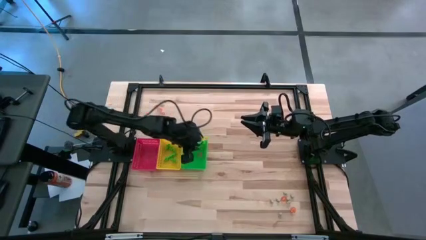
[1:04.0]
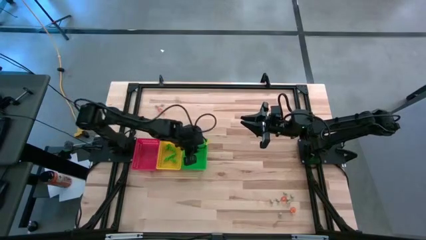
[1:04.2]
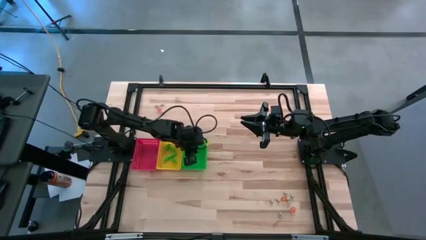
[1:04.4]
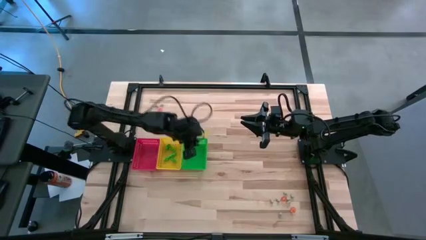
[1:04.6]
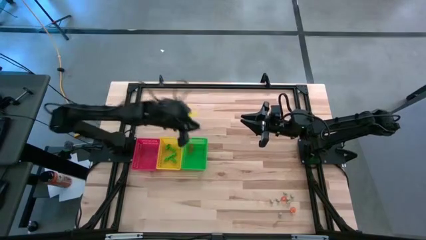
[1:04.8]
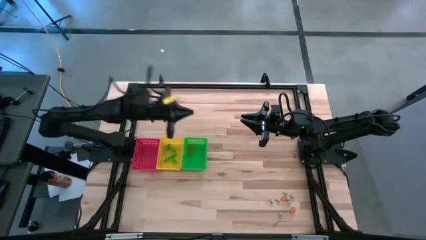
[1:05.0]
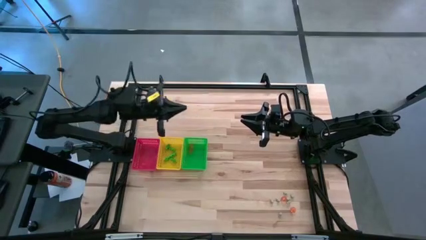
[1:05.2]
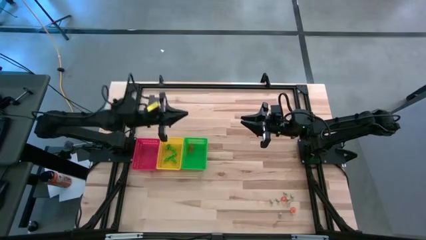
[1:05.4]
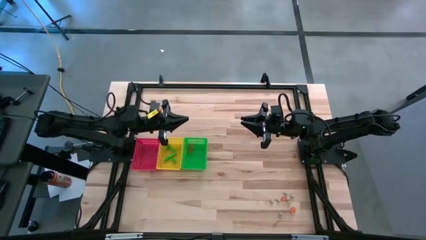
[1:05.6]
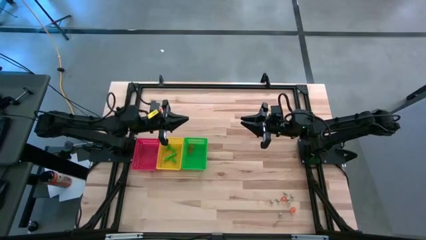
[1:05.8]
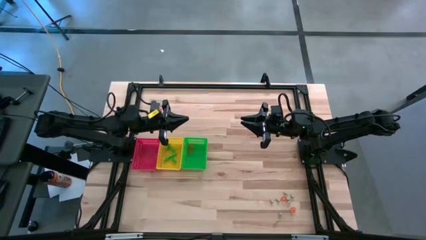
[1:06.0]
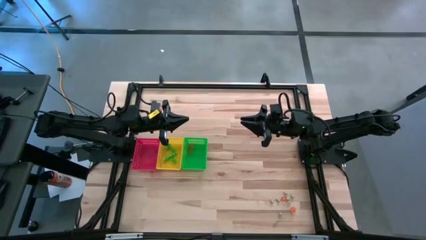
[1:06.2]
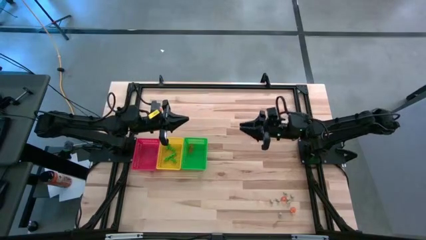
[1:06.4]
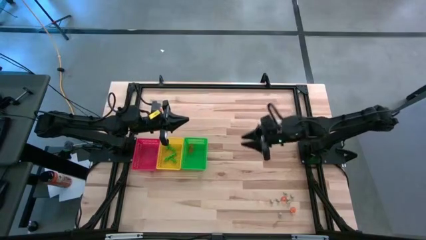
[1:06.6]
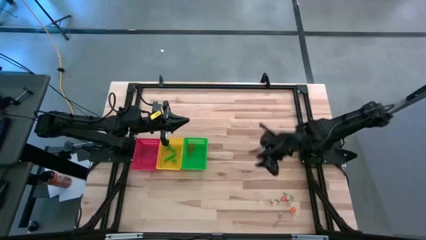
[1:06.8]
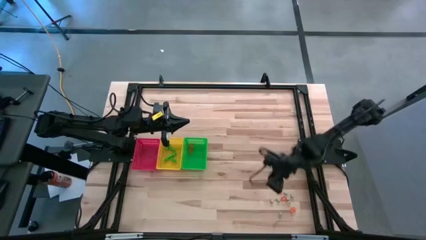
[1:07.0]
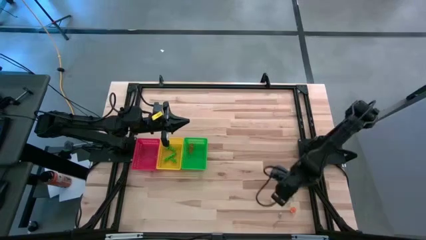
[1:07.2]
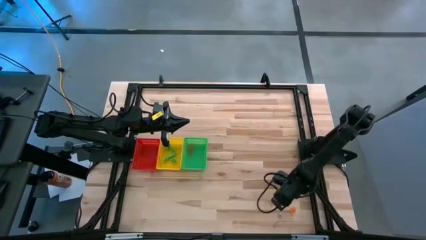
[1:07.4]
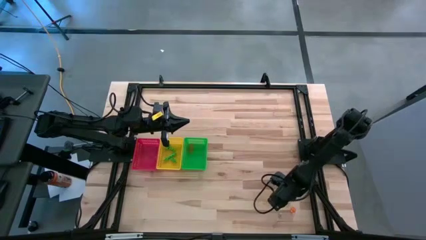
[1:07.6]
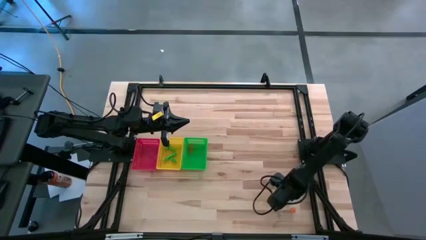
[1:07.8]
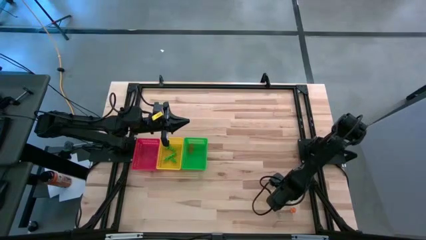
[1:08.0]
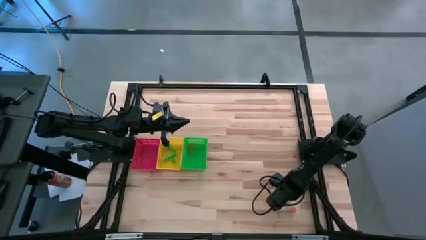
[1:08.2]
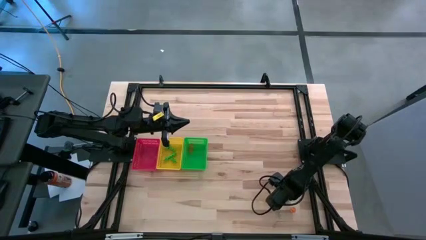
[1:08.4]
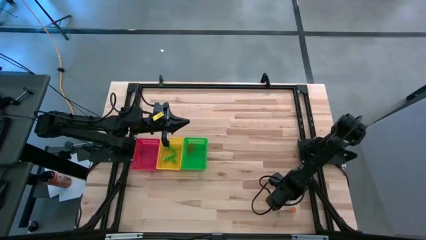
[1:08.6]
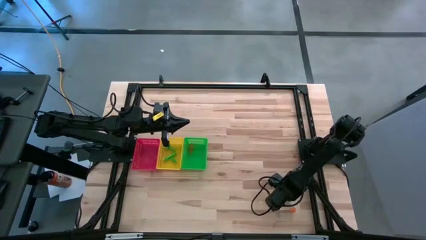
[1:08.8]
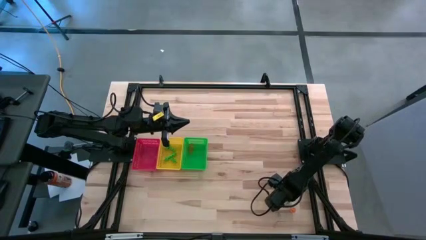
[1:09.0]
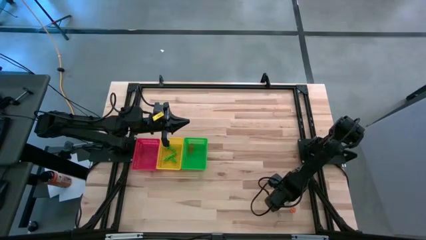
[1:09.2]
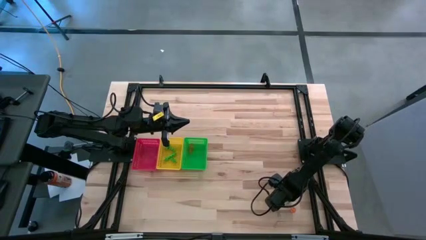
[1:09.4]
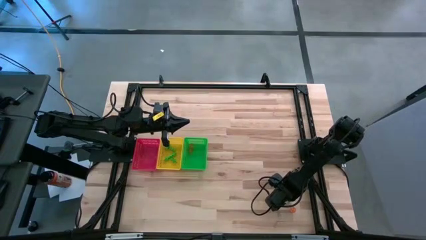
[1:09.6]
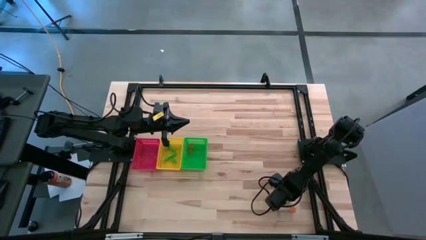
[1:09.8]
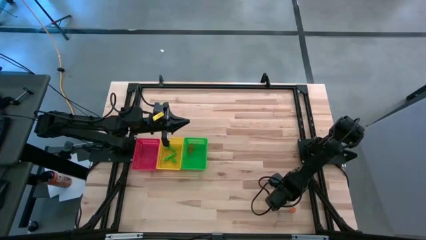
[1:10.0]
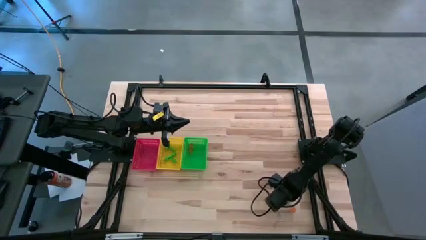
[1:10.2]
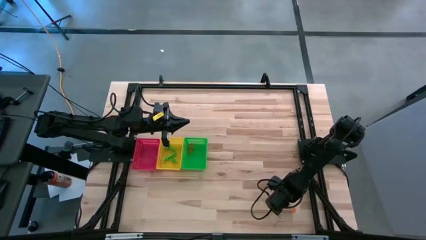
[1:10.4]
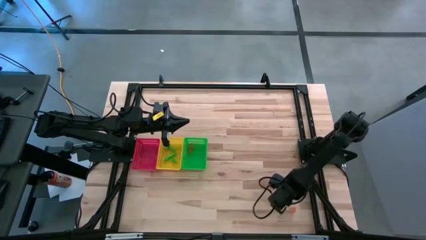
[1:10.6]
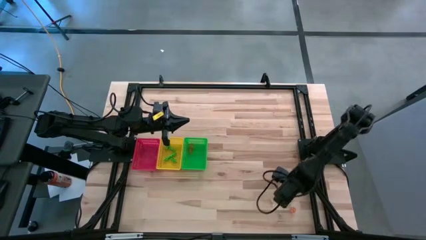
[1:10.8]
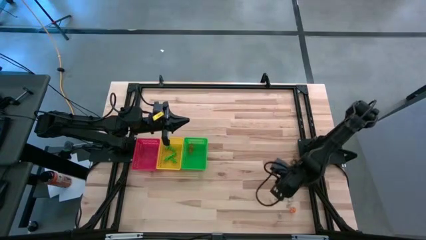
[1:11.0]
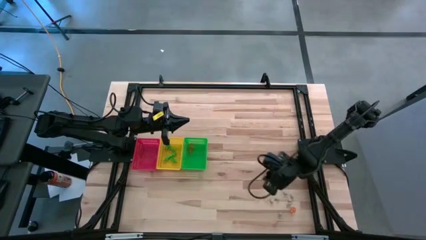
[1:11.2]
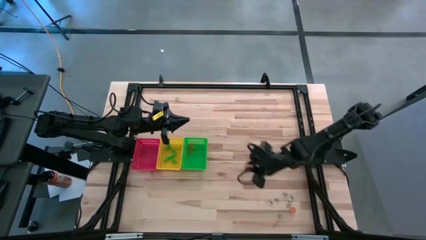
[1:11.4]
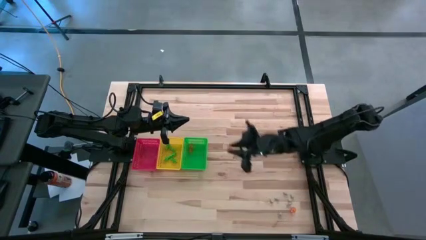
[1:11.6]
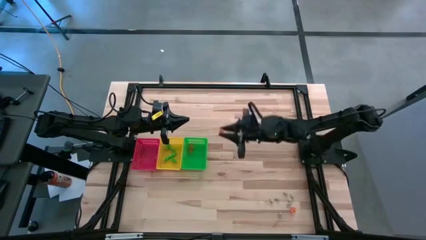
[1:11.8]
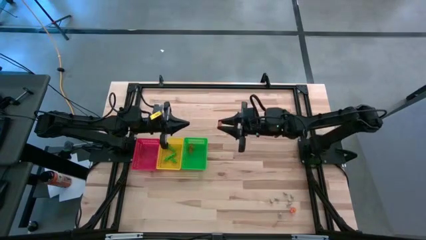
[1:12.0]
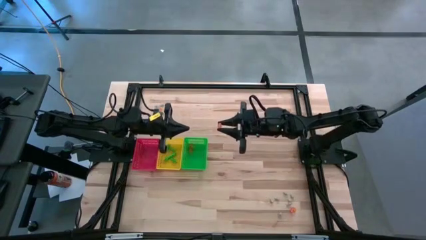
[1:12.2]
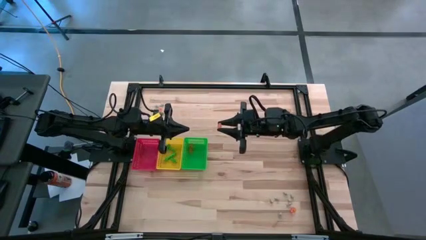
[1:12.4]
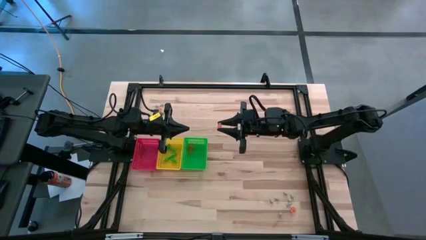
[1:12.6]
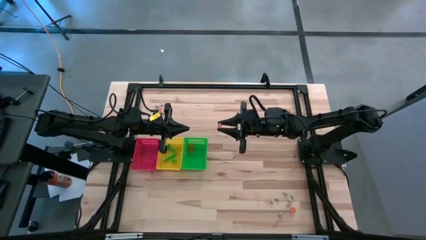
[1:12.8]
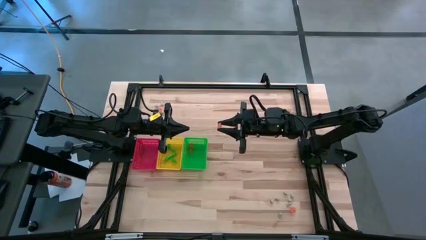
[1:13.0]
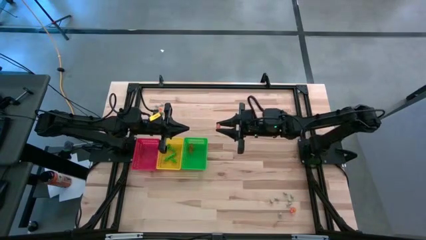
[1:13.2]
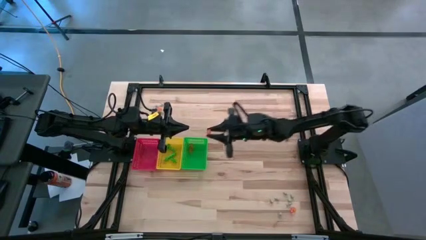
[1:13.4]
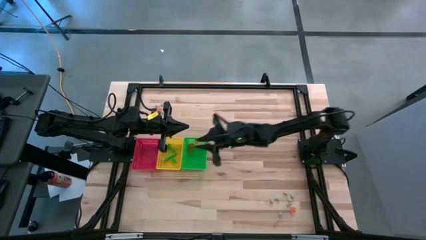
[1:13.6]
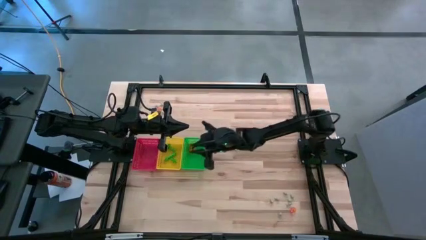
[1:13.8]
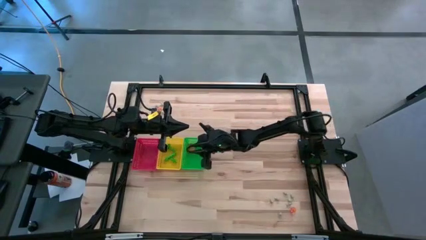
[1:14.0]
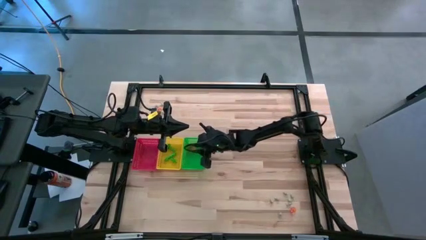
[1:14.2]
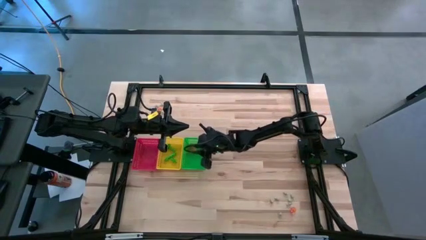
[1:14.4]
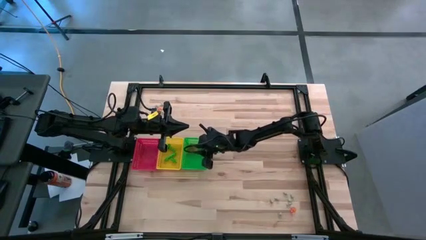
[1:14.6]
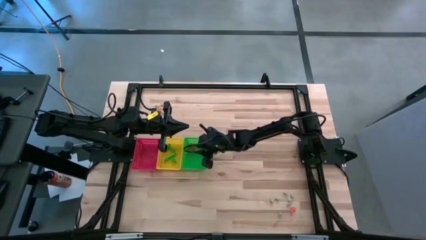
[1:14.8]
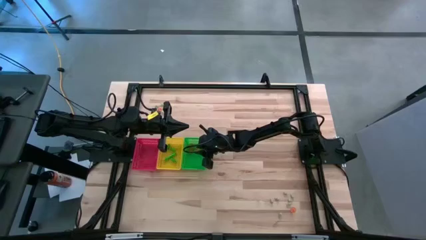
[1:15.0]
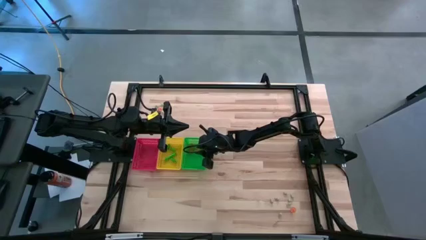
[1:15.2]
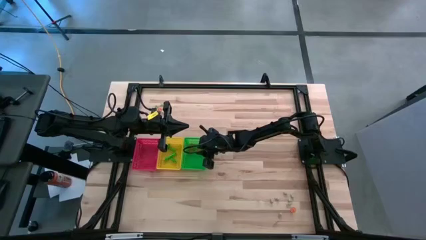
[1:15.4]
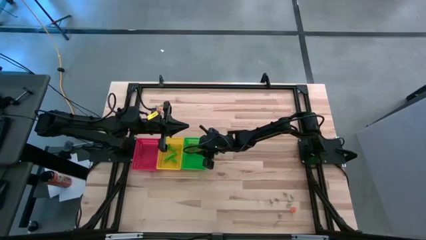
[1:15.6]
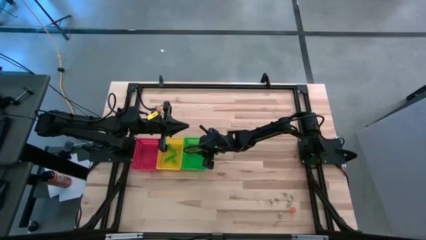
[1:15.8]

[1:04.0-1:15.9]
Task: Sort Halloween decoration
Put the orange pumpkin toy into the green bin

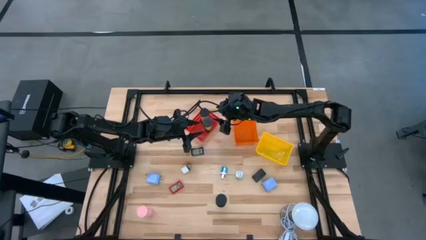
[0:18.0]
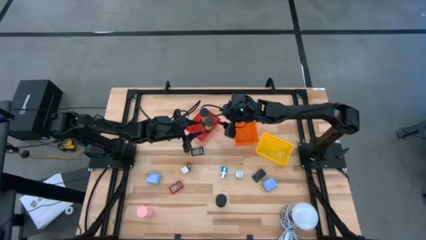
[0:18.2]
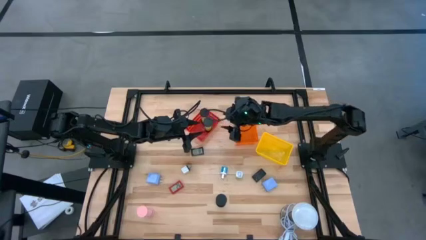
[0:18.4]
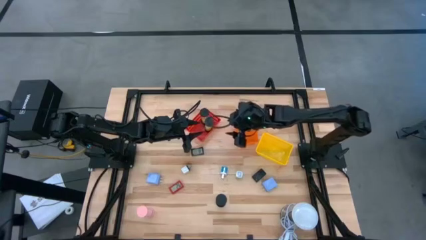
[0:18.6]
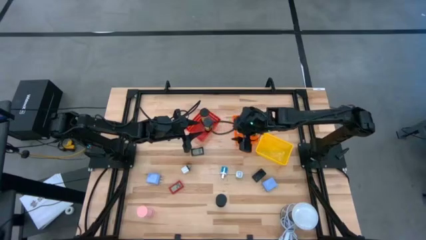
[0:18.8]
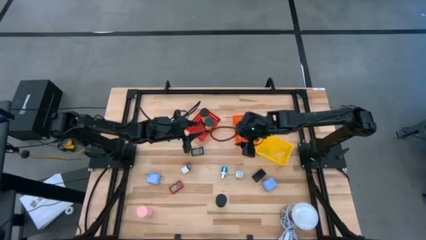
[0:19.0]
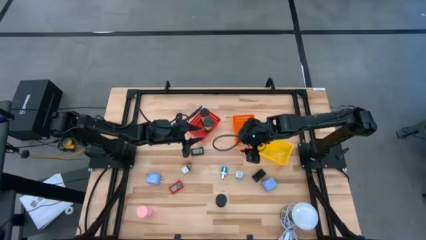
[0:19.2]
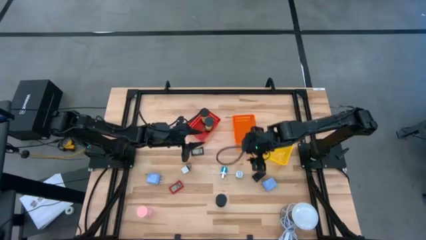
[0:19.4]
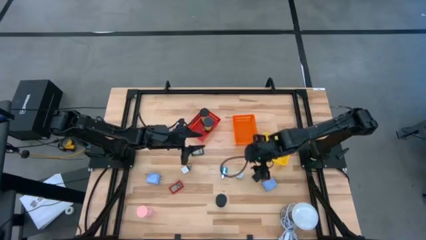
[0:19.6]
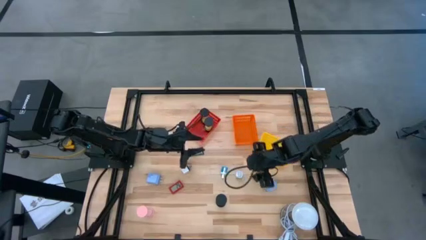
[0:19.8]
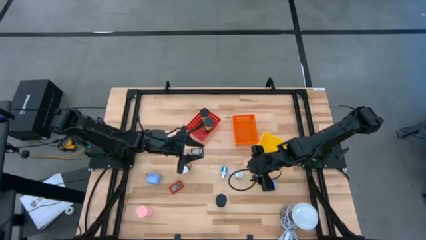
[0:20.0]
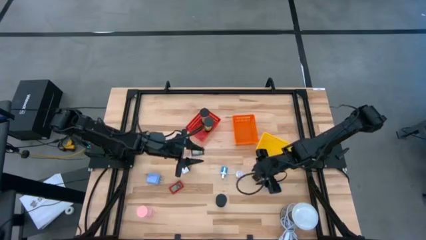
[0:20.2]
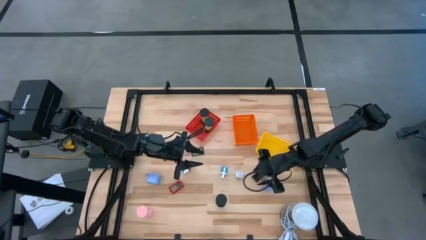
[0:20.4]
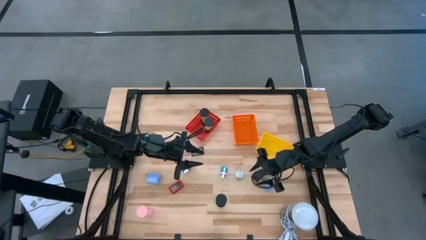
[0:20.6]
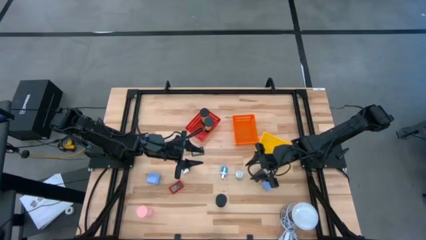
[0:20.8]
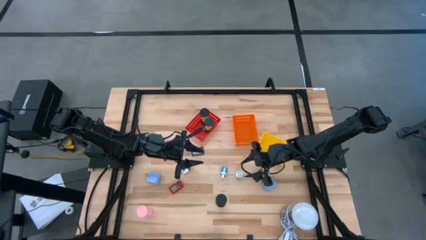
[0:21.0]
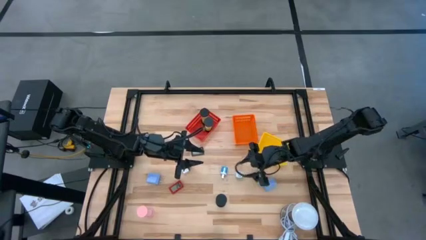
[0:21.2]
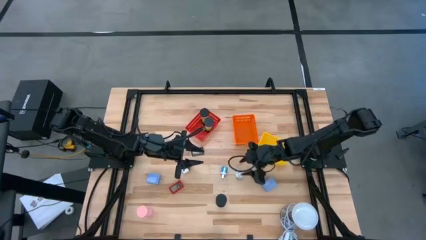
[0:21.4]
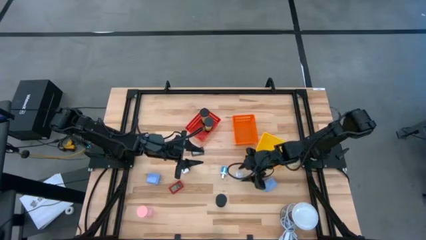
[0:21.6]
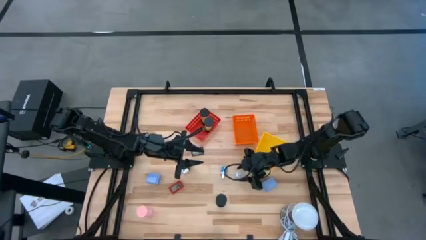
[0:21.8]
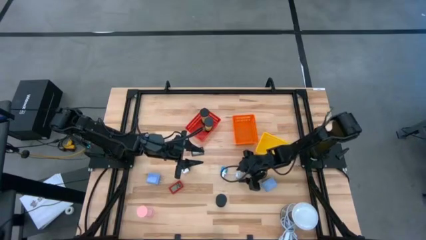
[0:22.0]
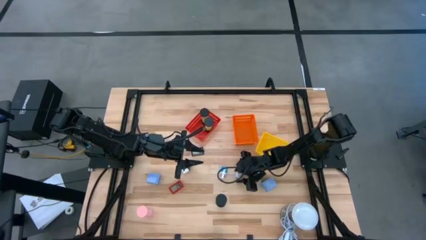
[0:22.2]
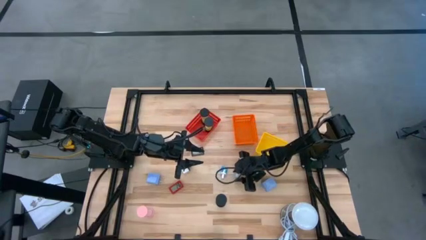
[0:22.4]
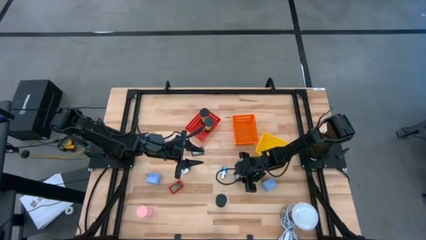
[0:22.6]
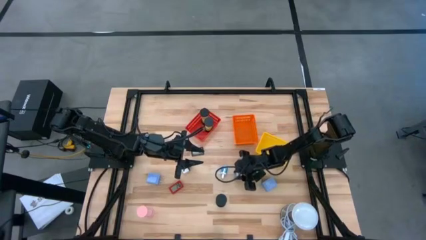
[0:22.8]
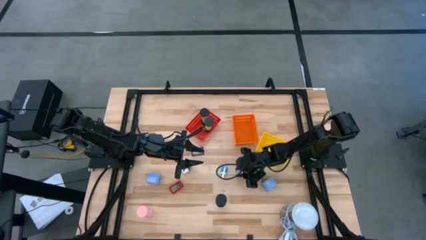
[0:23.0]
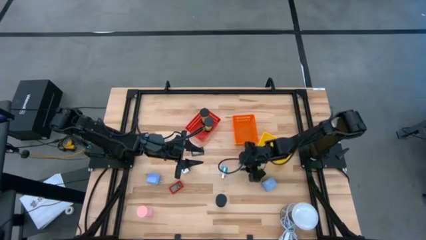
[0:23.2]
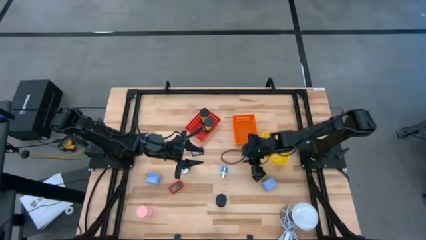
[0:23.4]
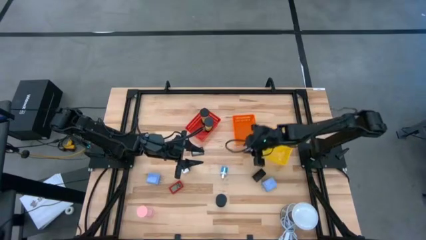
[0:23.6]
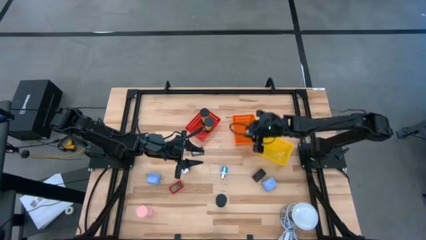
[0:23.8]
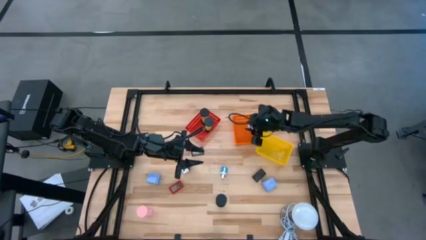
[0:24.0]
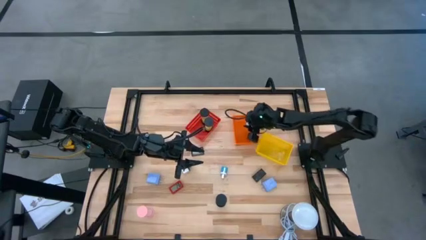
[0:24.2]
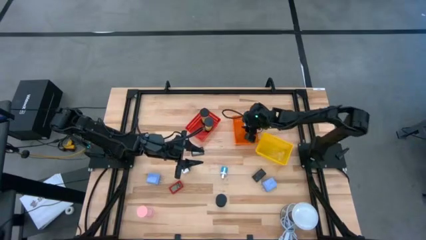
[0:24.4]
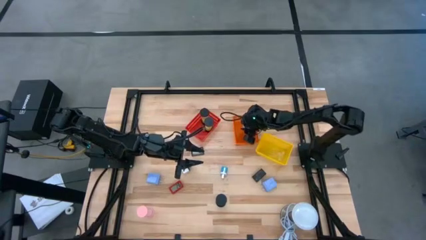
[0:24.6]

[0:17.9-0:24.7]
Task: Pick & Place Office items
Put the green charger adapter into the orange bin
